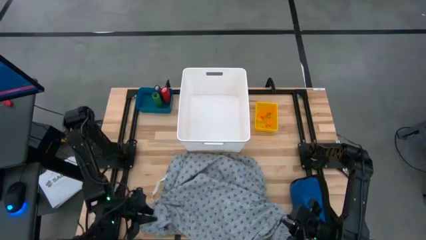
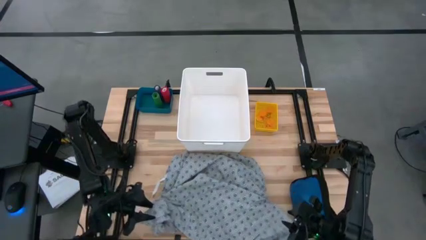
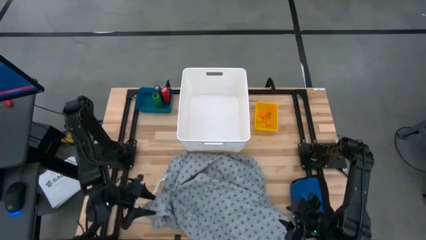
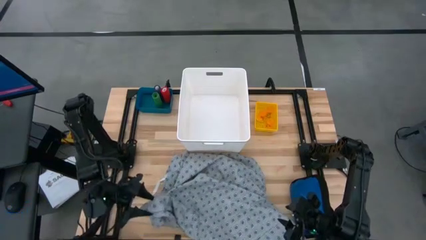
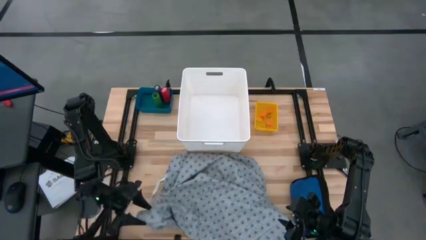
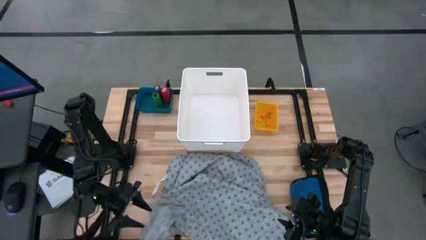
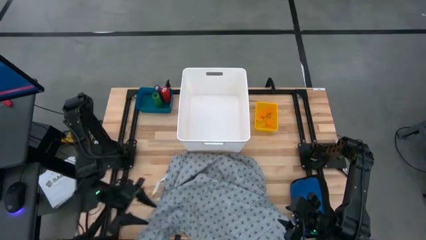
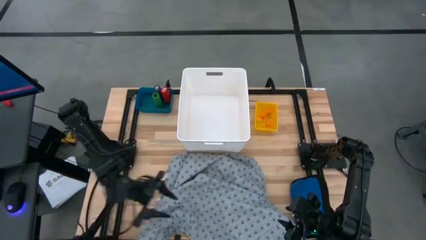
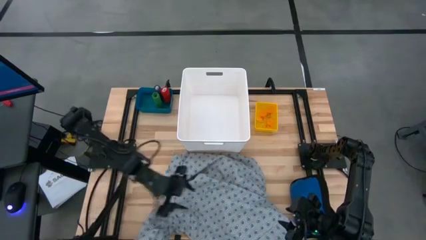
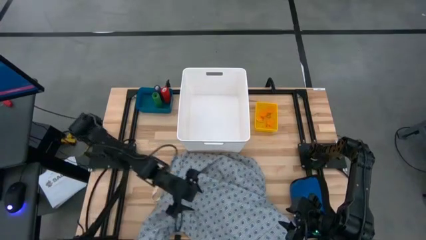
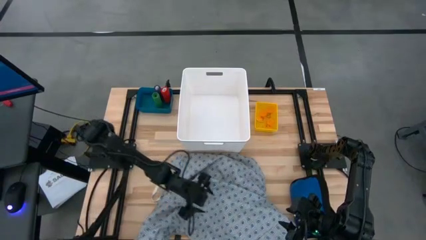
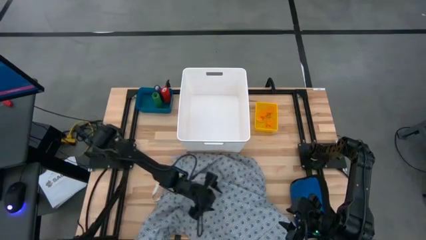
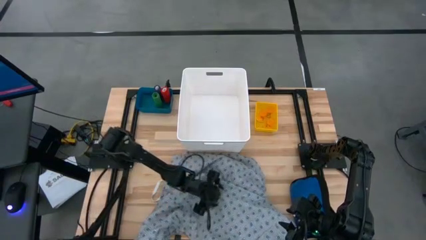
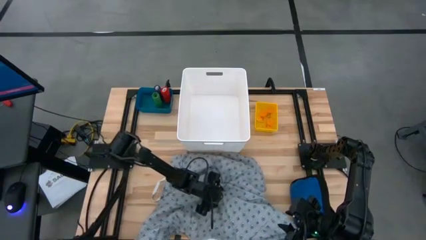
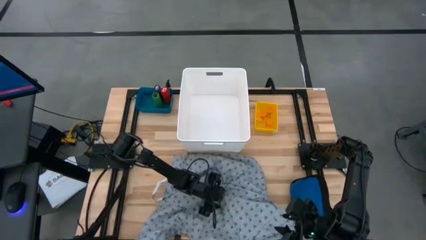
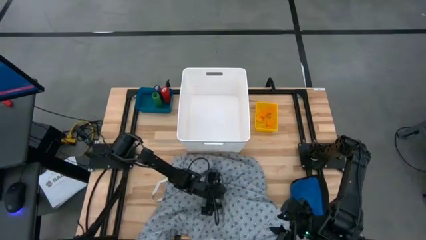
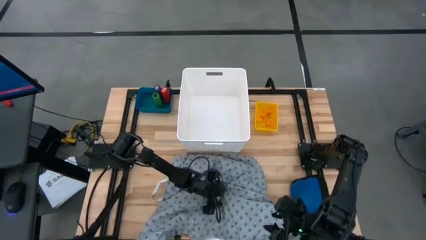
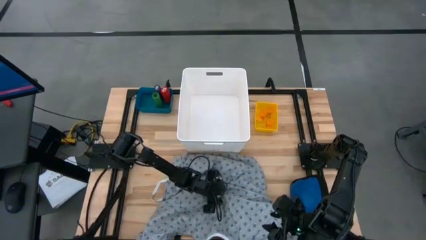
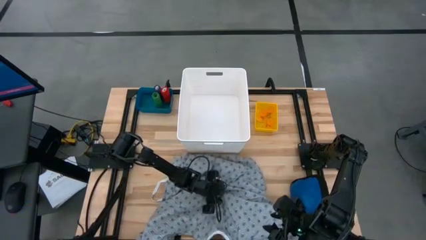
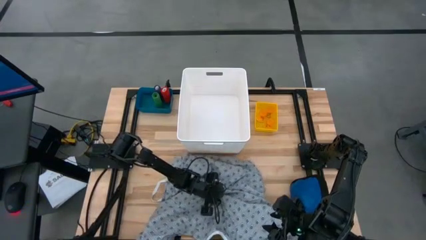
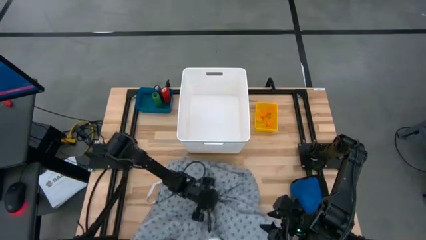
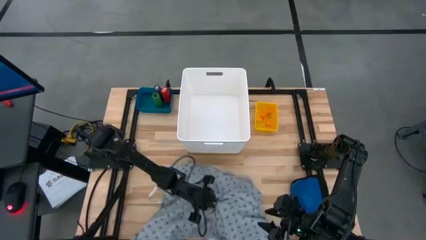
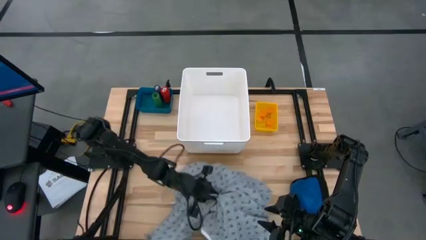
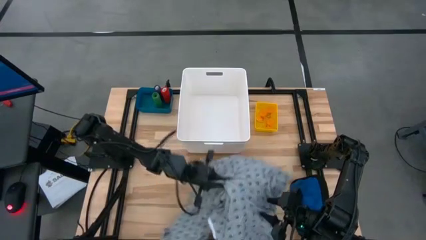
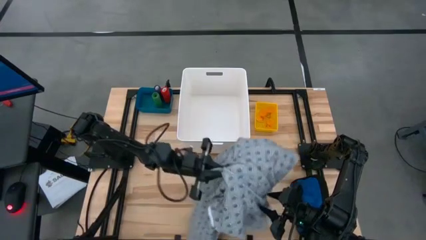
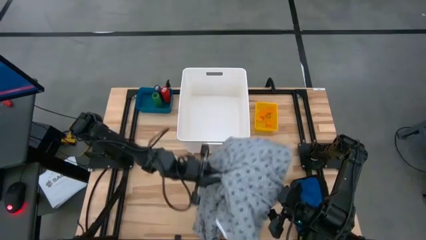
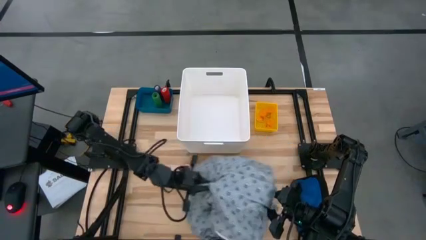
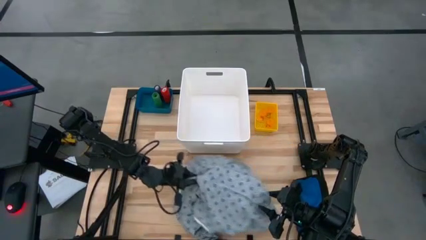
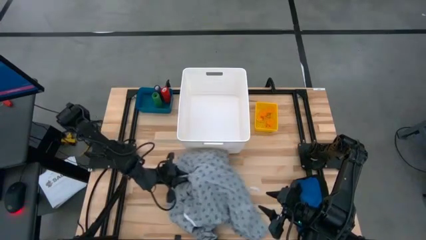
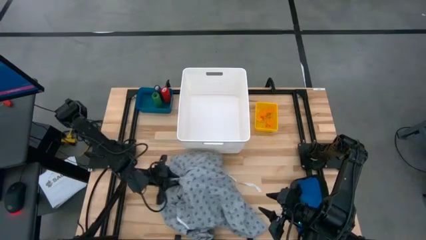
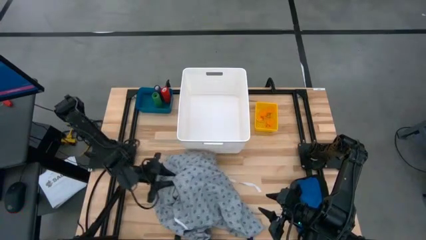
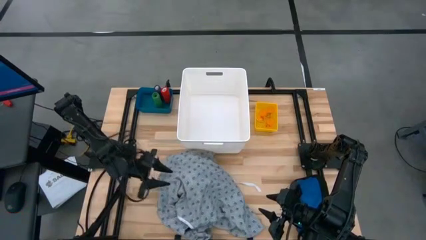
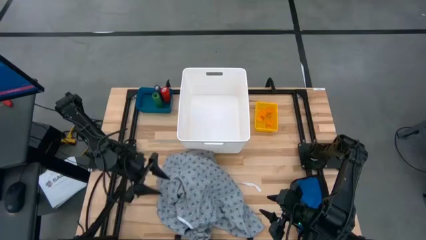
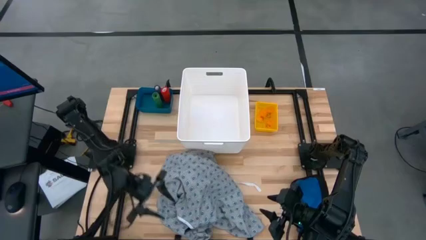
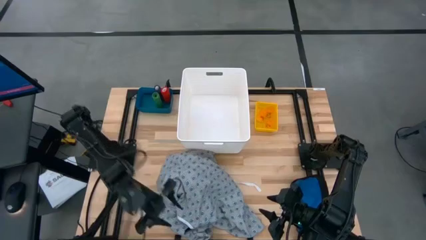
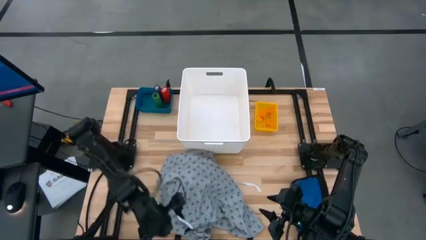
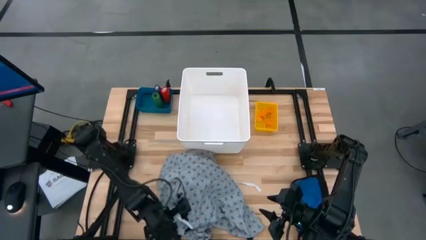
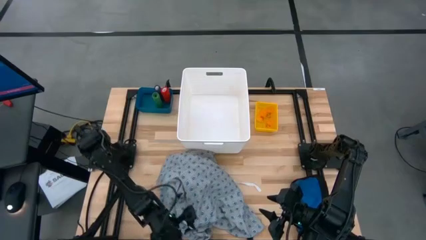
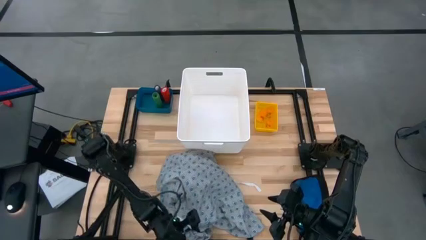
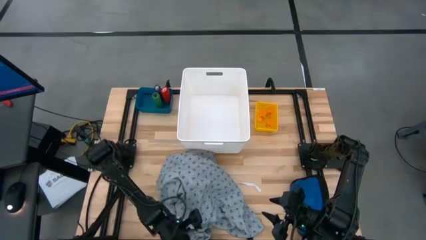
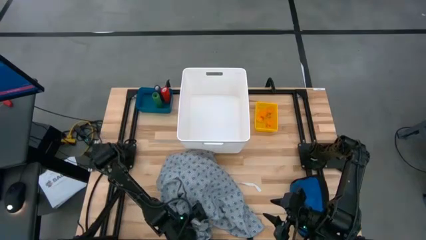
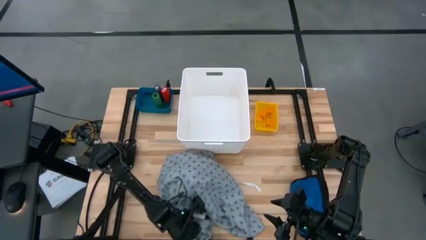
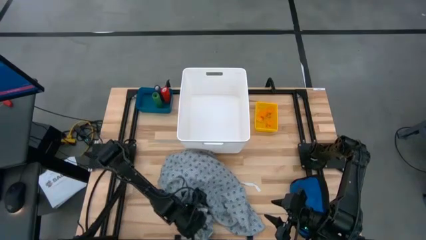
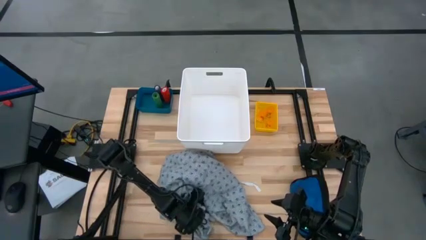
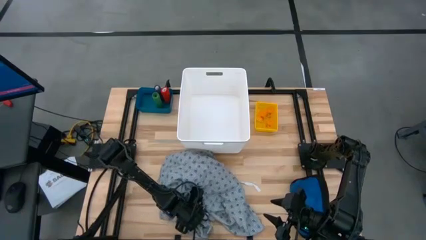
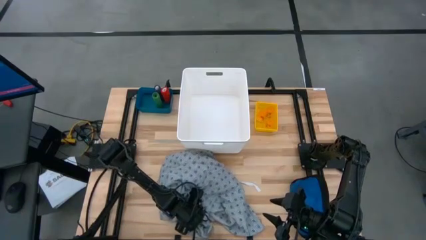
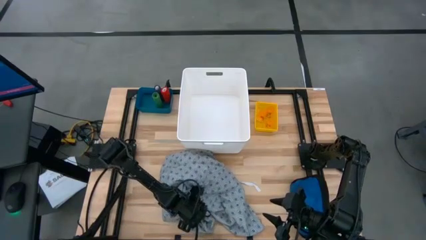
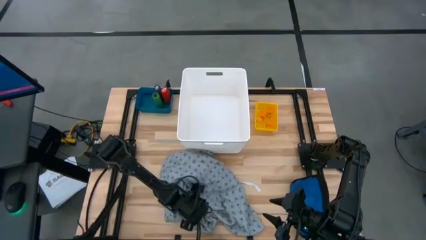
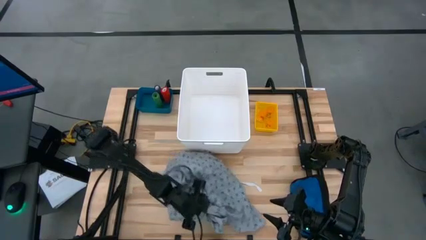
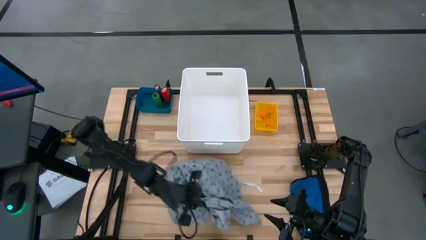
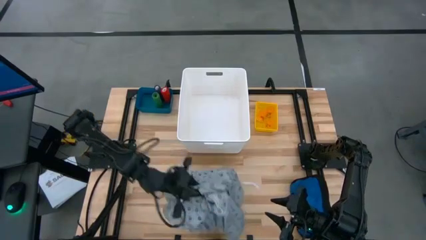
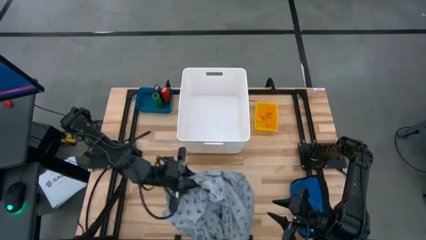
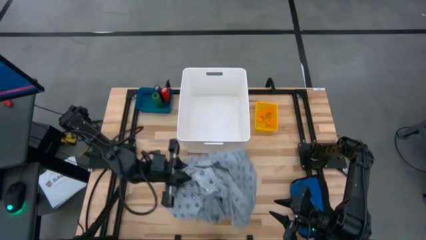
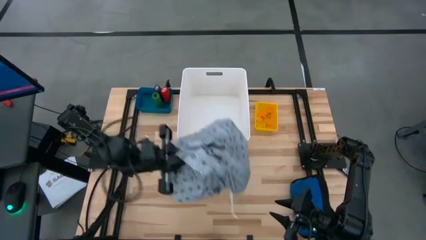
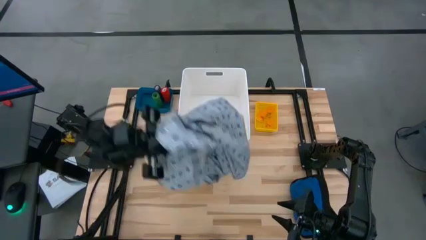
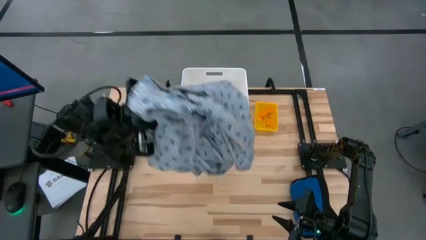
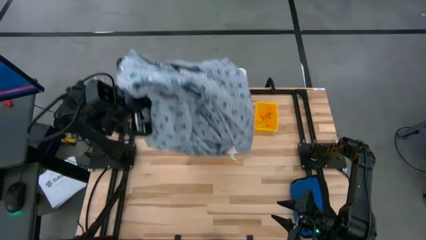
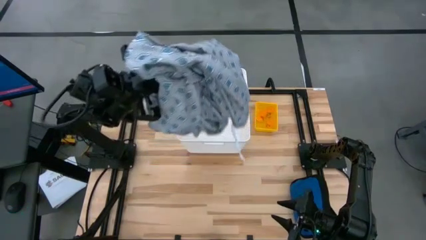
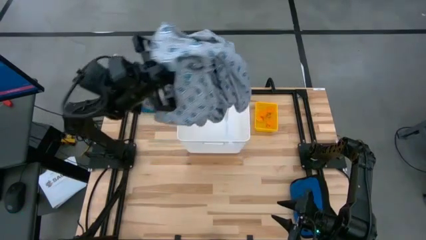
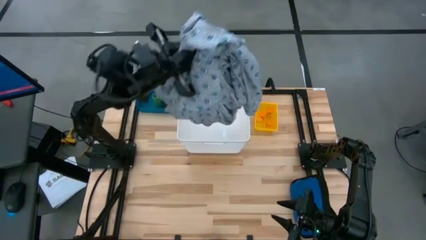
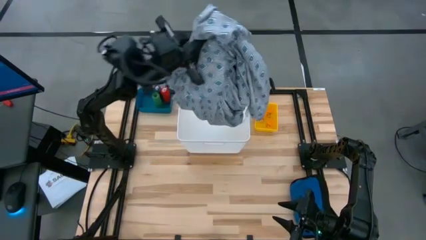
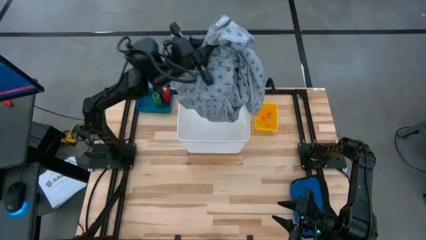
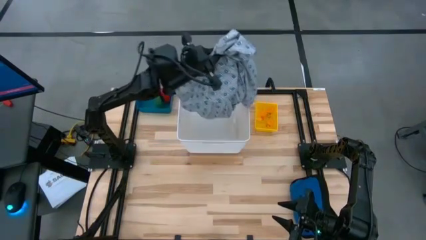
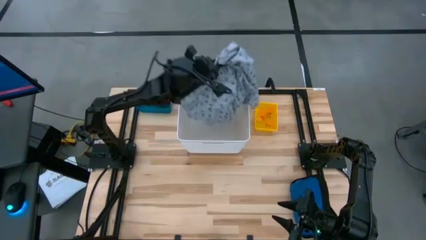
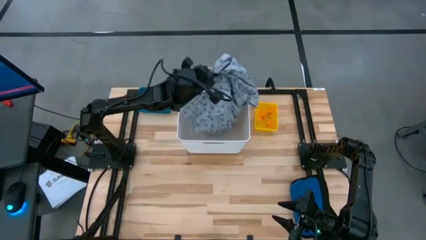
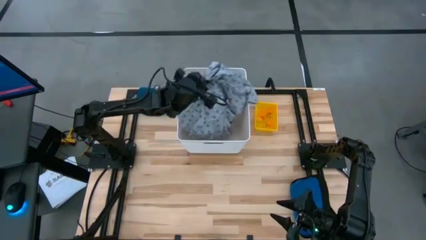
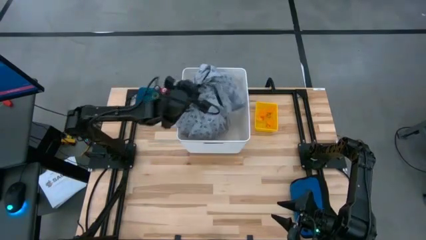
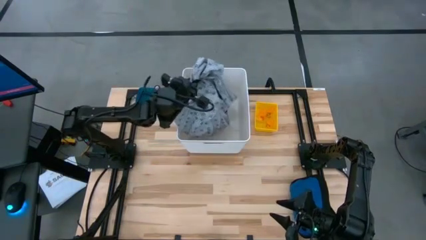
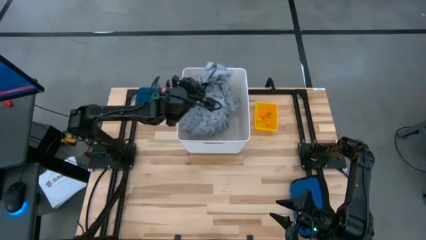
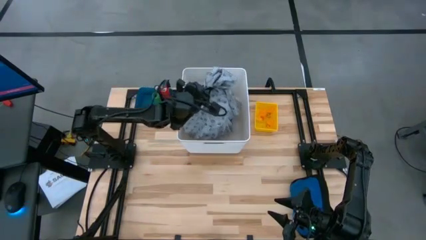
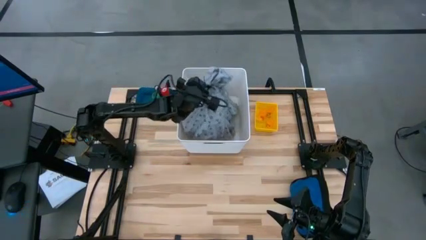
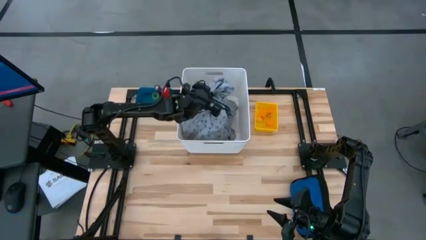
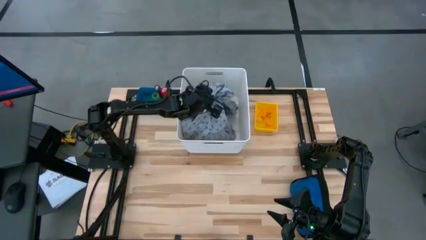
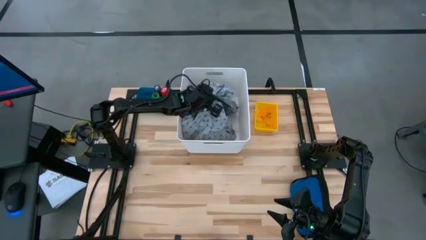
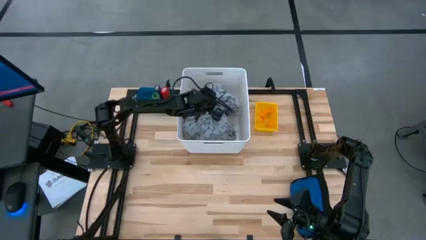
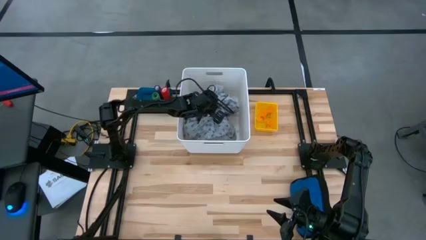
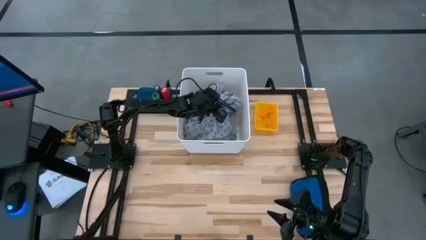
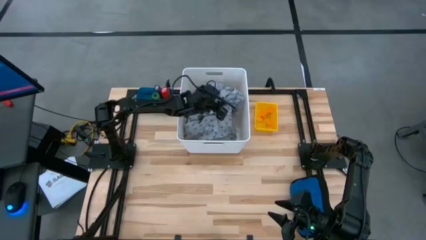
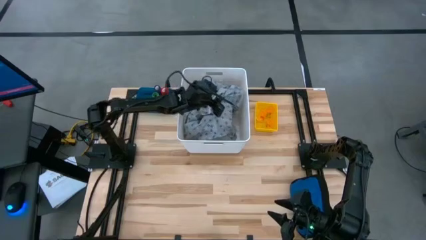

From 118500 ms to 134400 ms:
Task: Pick & place medical supplies in basket/bin
Put the gray patient gown into the white bin
